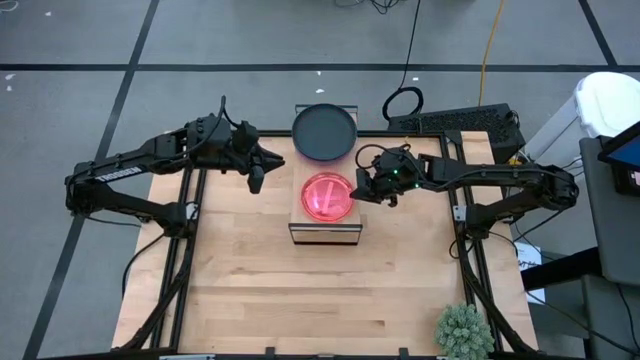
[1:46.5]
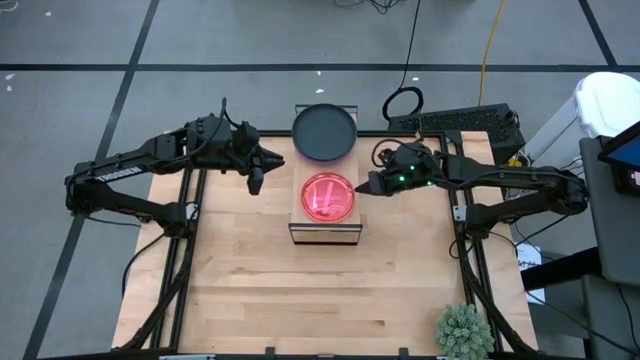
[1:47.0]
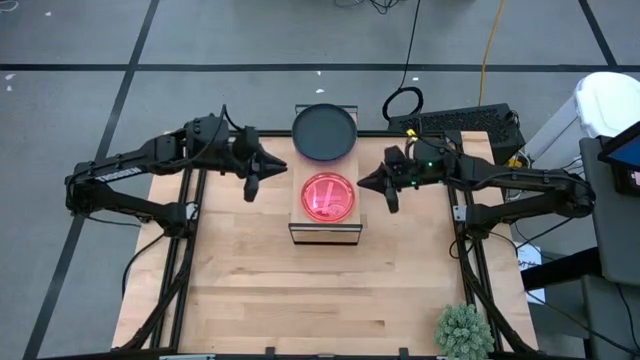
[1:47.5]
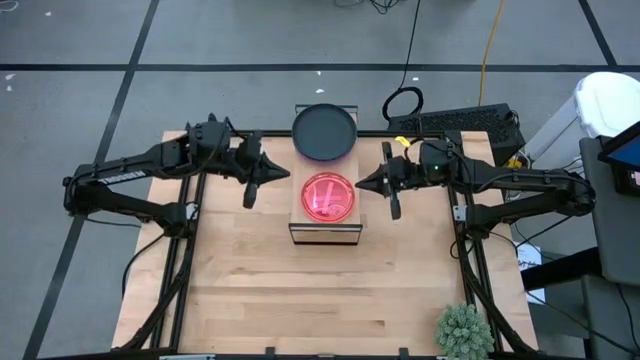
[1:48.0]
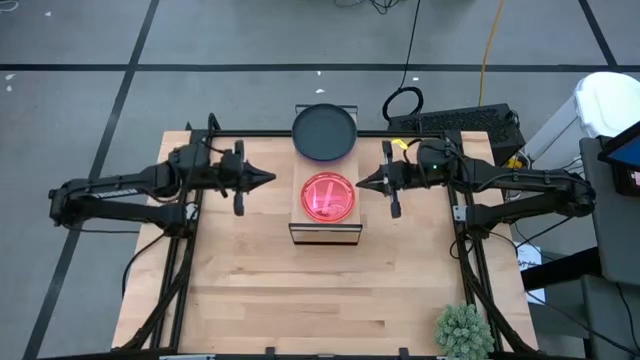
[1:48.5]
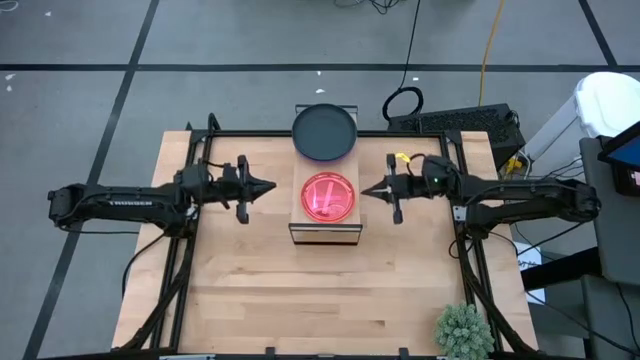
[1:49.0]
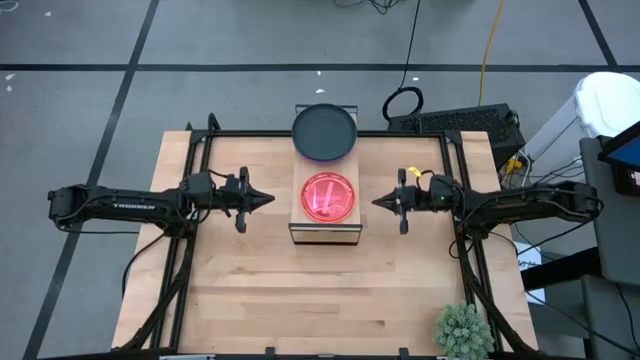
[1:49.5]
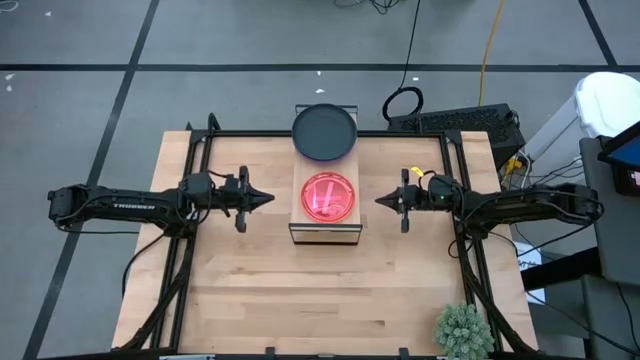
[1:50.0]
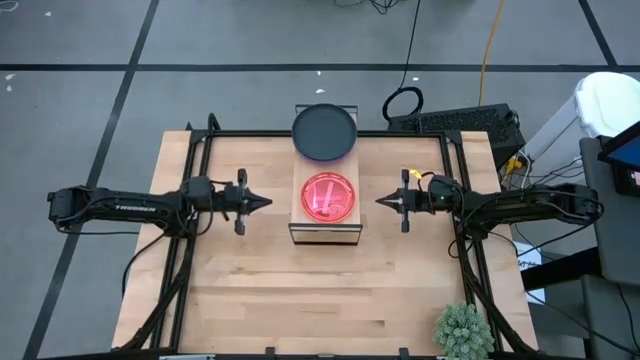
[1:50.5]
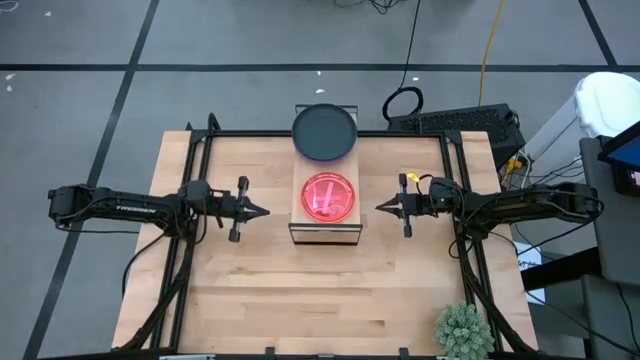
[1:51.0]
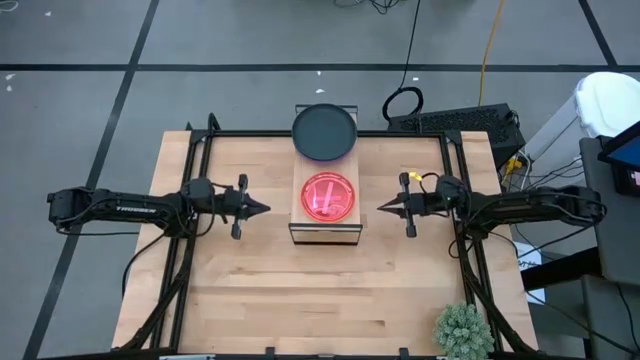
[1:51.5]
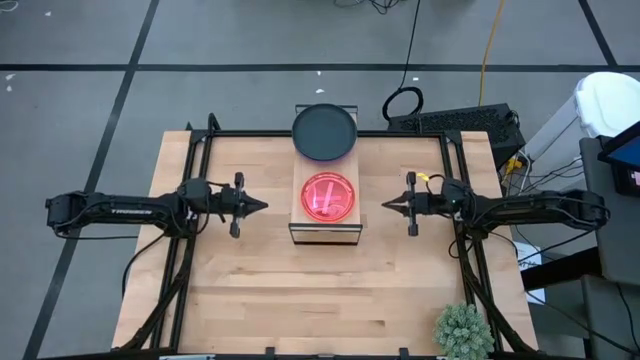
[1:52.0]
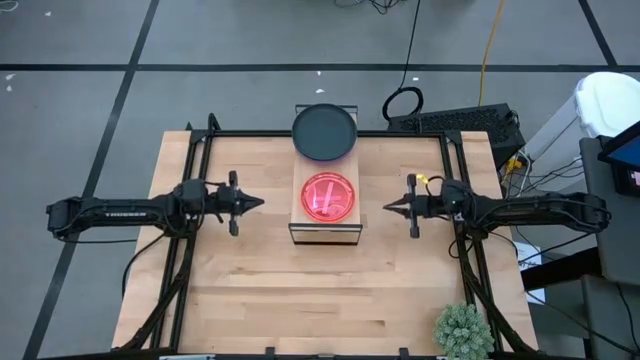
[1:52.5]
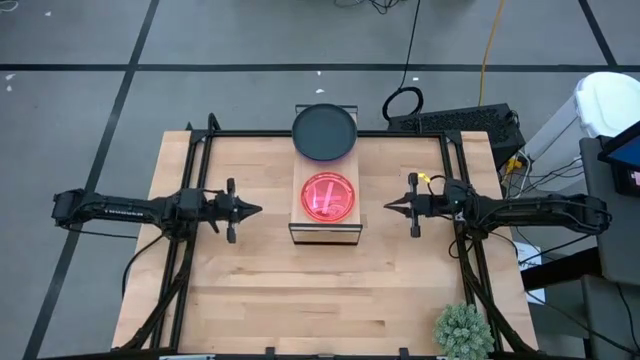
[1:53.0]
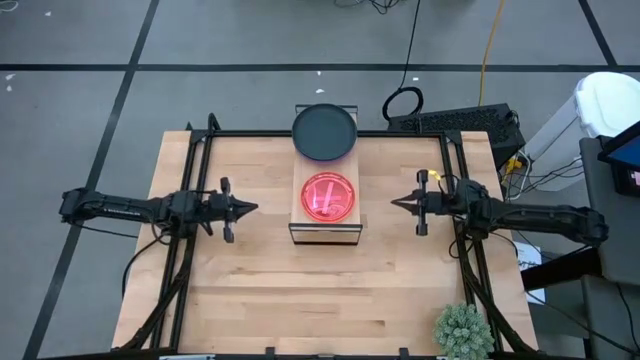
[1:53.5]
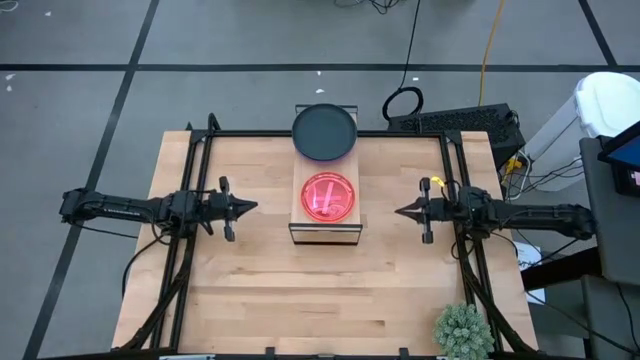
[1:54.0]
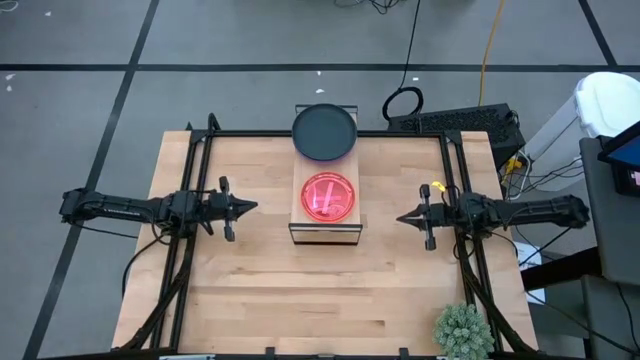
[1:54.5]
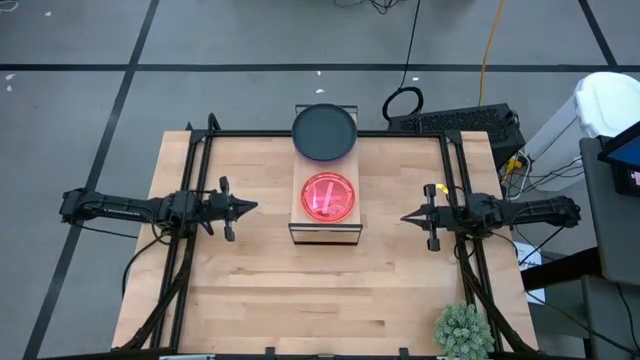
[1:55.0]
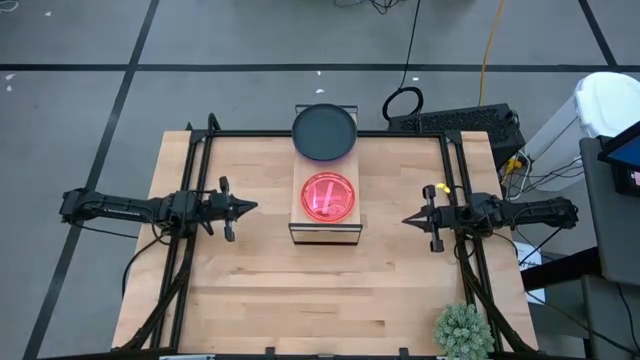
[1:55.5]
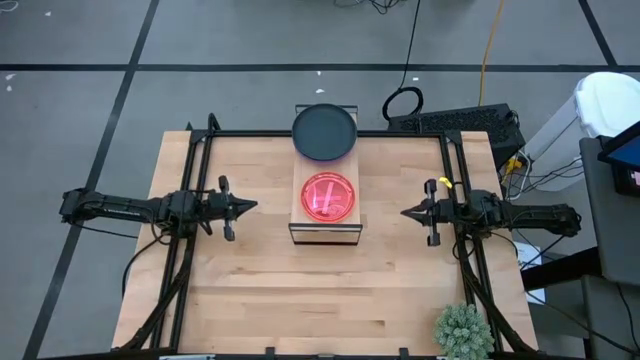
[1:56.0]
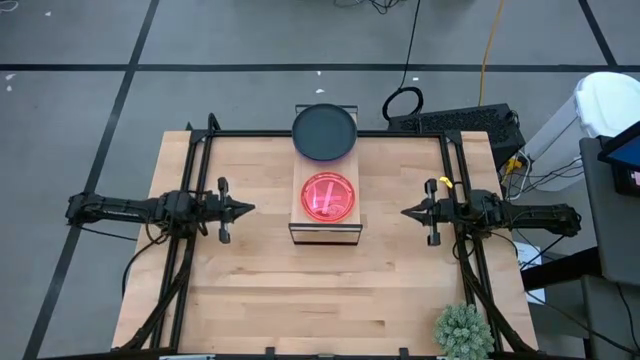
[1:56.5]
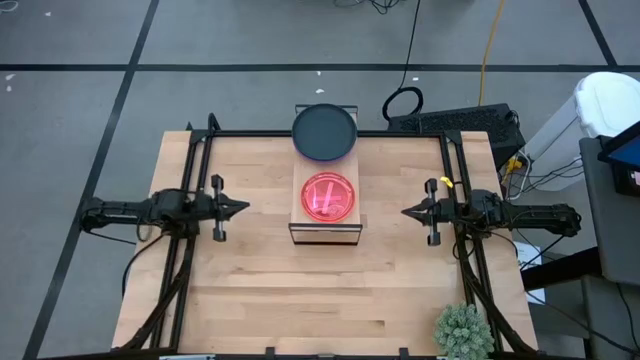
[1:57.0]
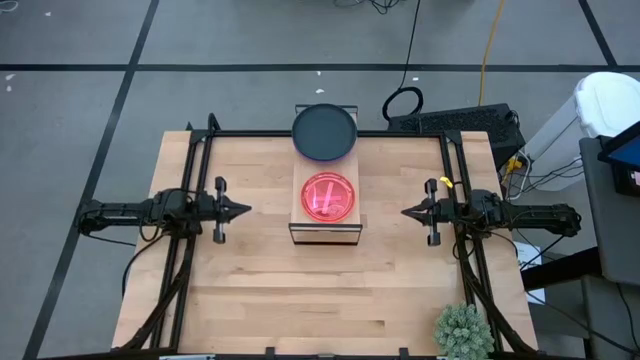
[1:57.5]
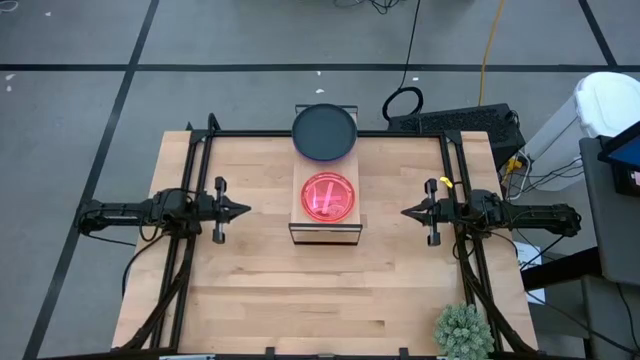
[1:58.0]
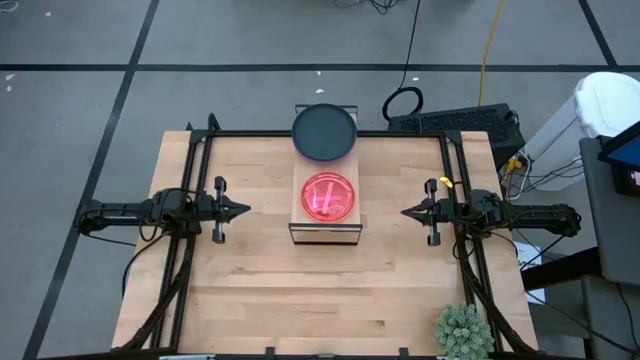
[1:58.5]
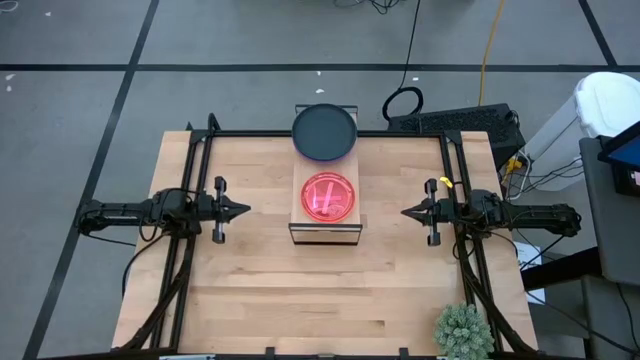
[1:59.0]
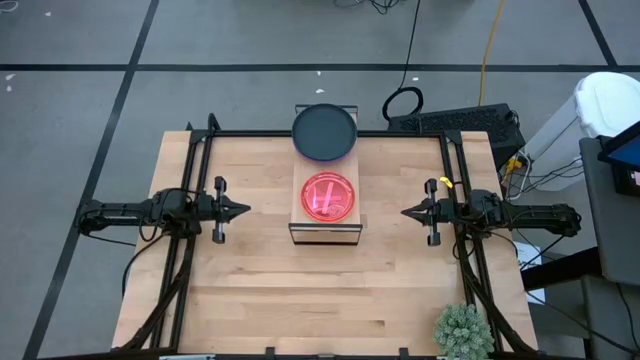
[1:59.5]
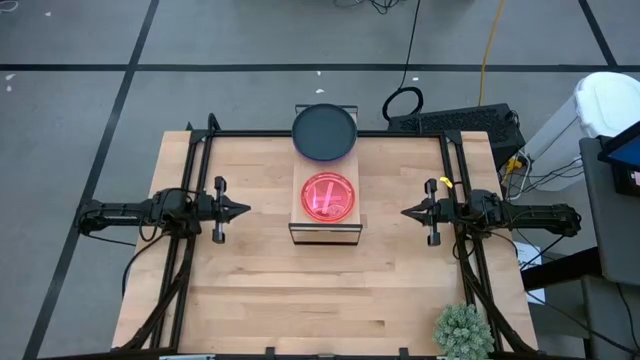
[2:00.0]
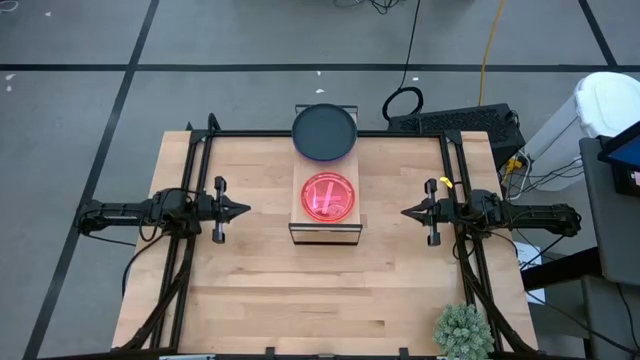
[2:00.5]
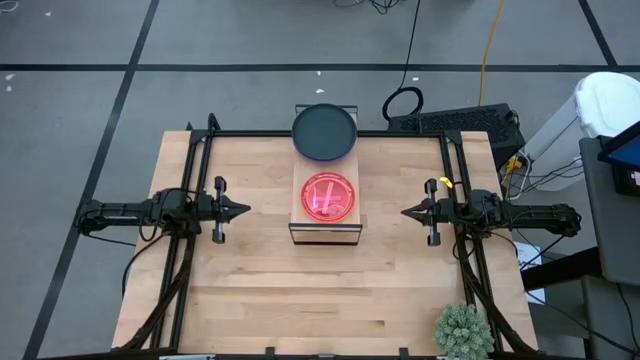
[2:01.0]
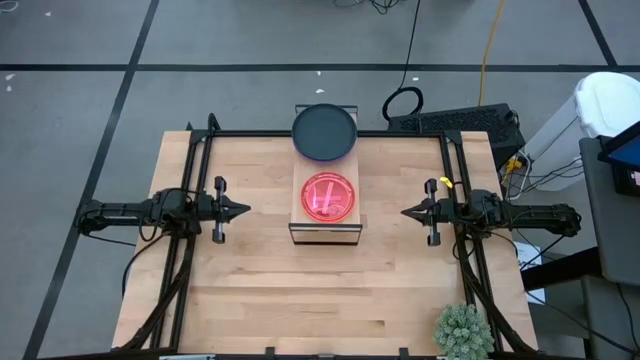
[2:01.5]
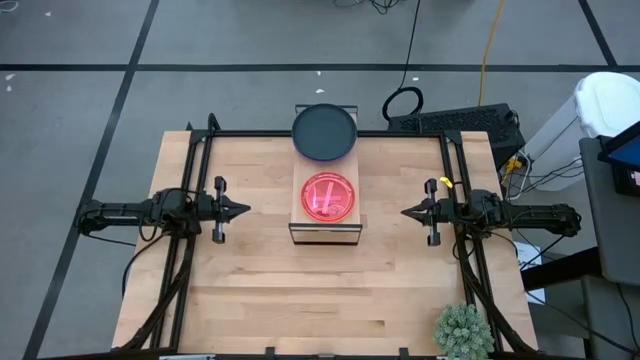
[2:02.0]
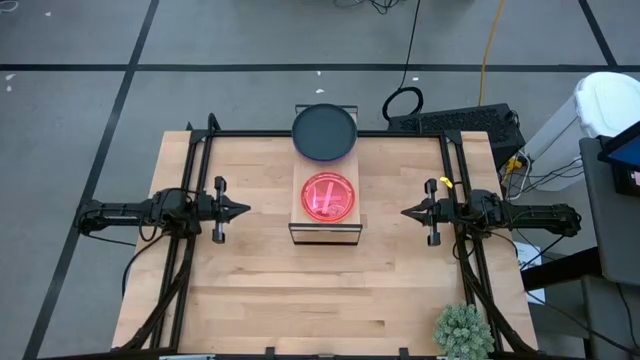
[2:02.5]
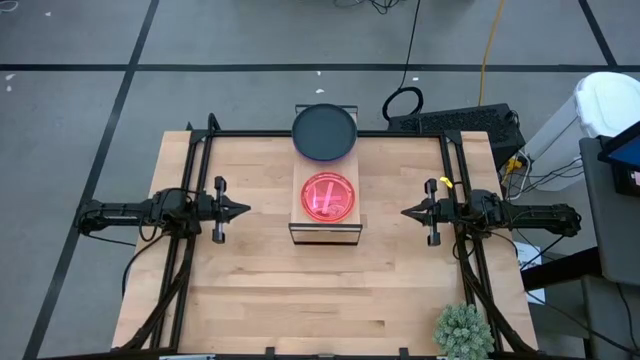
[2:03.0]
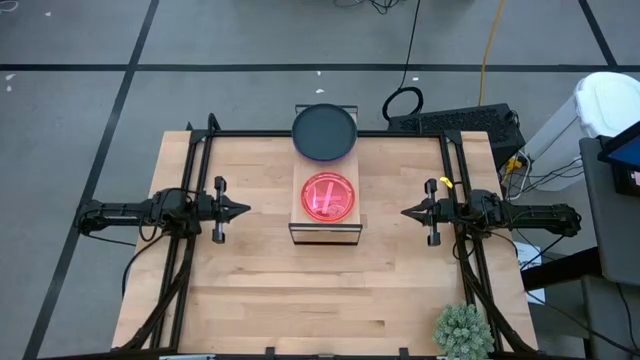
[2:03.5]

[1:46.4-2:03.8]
Task: Place and stack plates onto a shelf
Return to Home Position

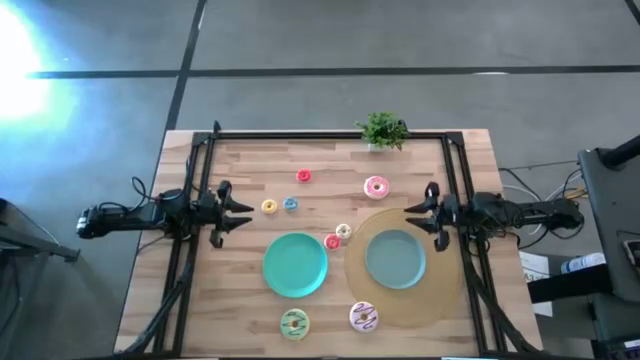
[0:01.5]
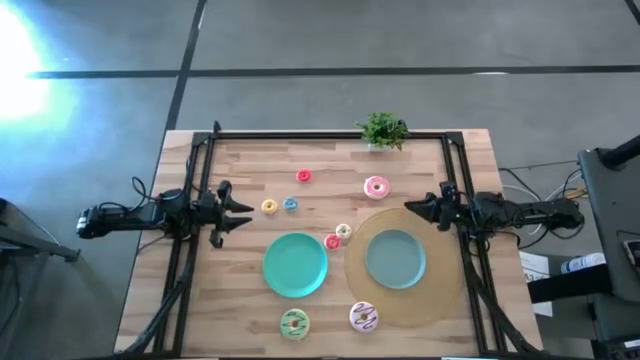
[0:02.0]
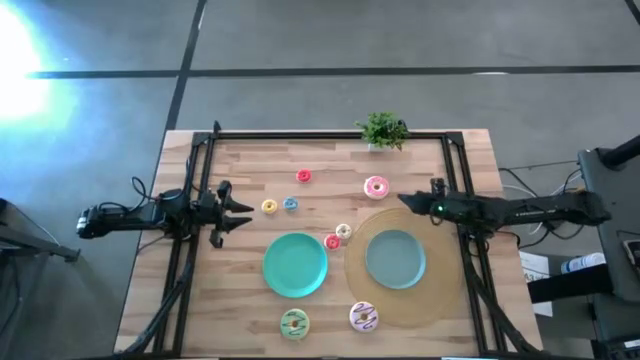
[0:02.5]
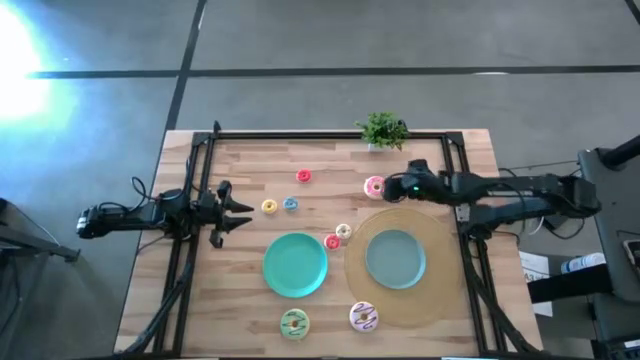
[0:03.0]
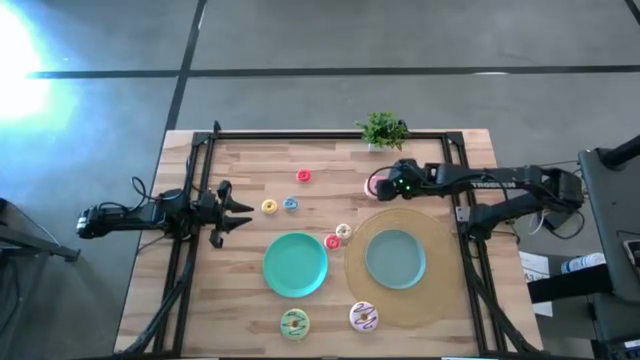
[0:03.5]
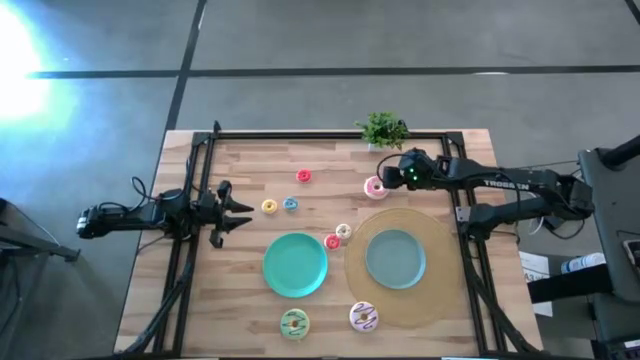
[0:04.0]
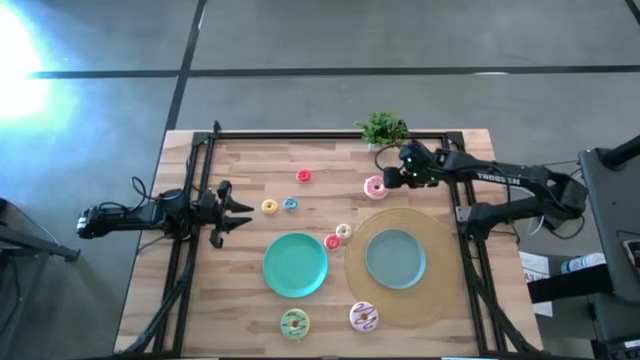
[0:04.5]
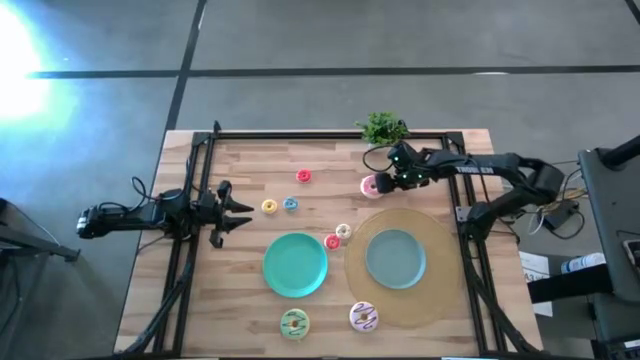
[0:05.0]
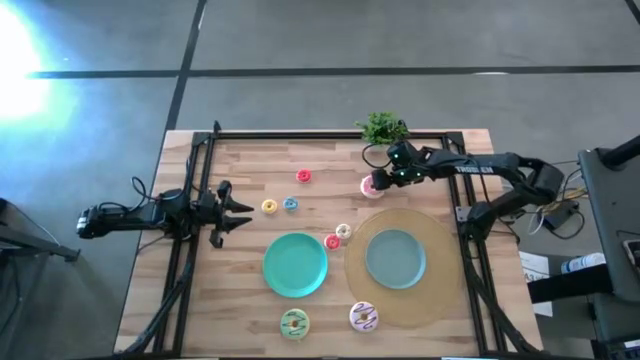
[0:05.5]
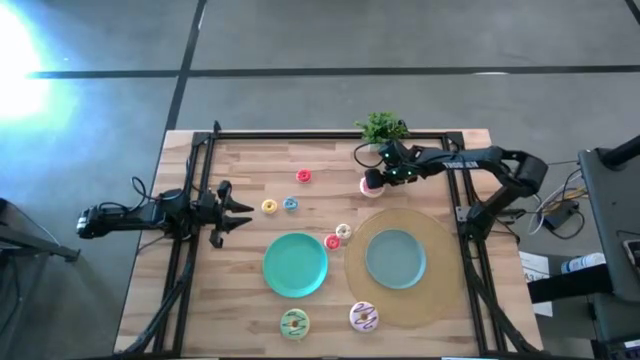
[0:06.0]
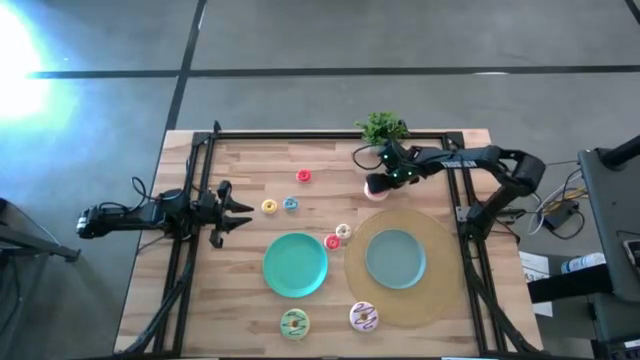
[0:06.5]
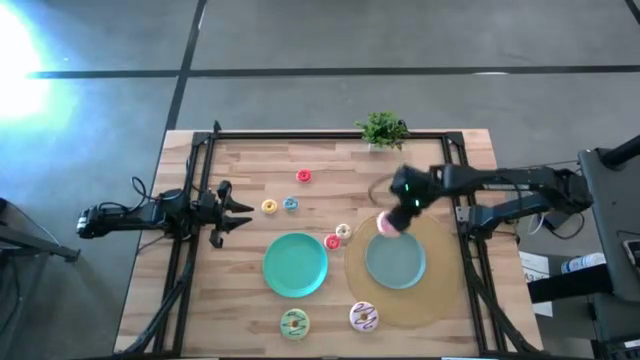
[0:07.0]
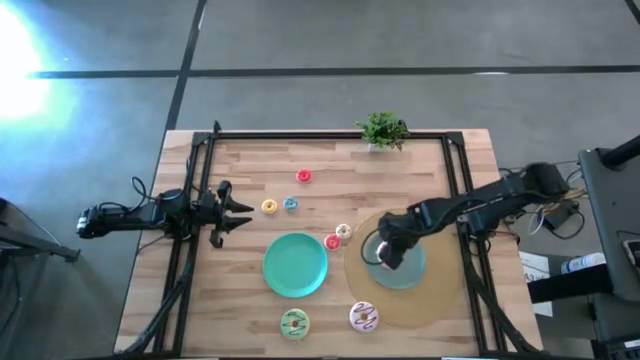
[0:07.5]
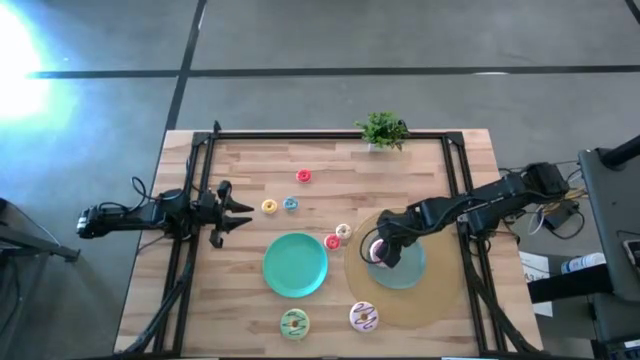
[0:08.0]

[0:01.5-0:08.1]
Task: Pick & Place donuts
Put the large pink donut on the light blue plate
